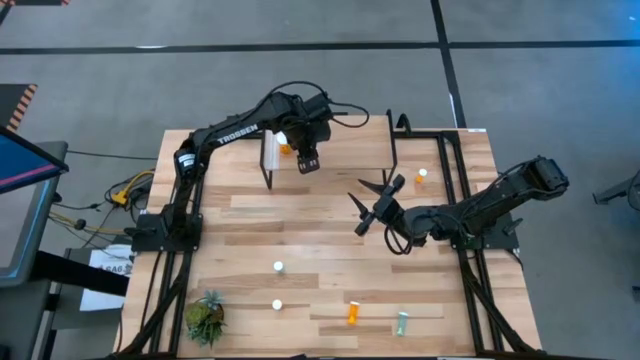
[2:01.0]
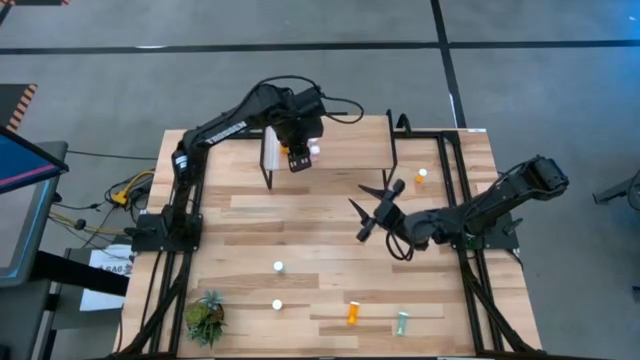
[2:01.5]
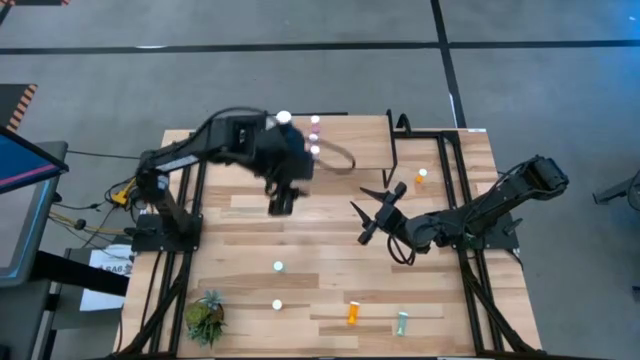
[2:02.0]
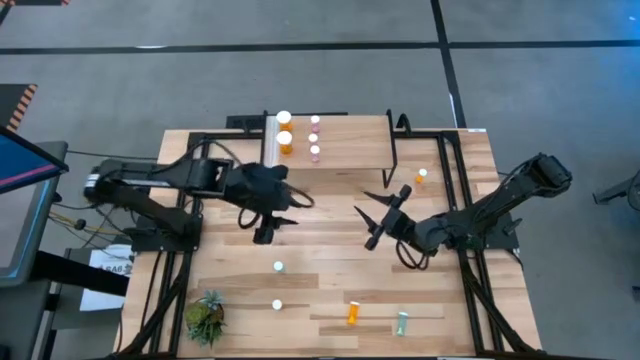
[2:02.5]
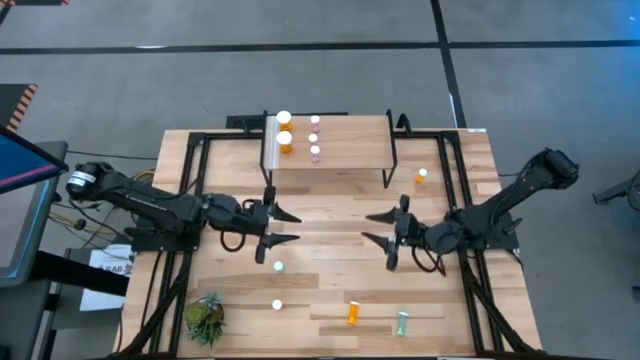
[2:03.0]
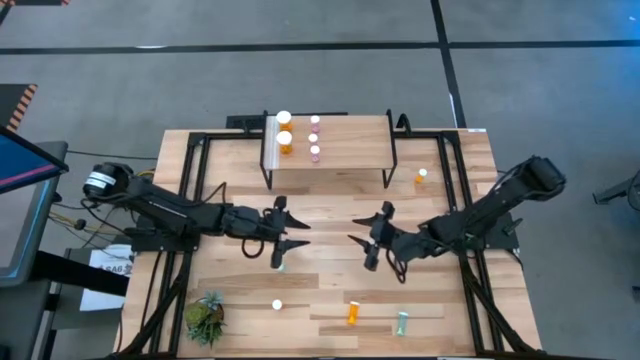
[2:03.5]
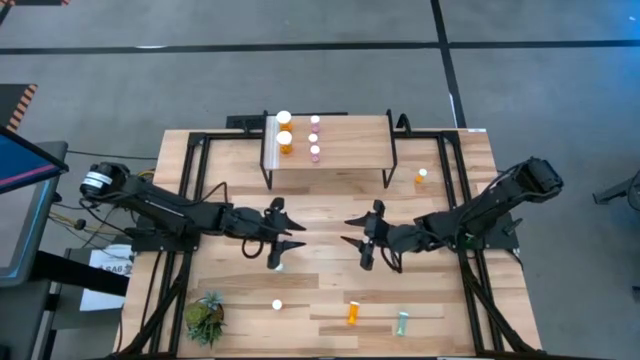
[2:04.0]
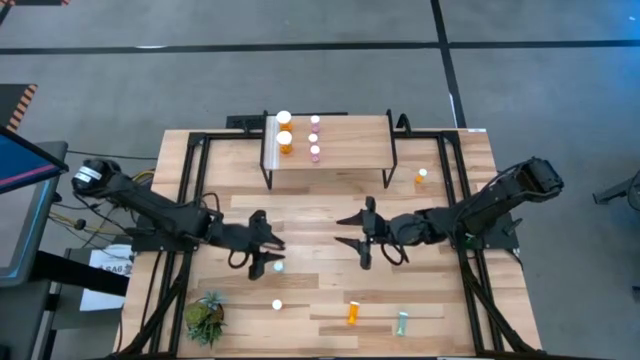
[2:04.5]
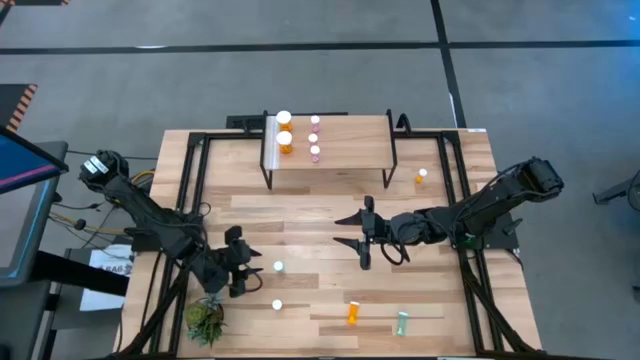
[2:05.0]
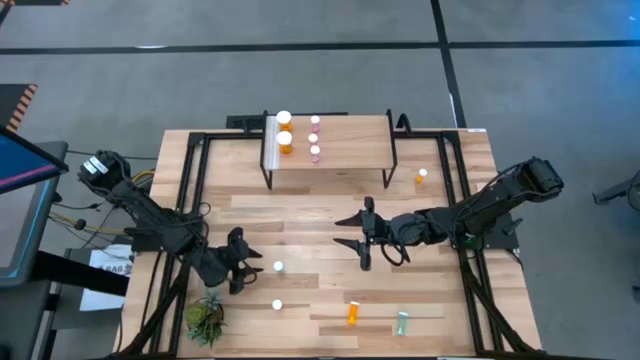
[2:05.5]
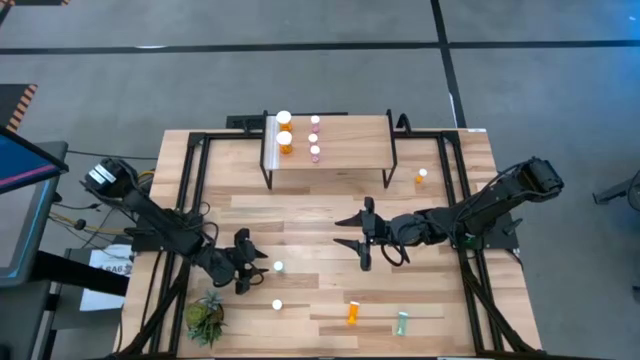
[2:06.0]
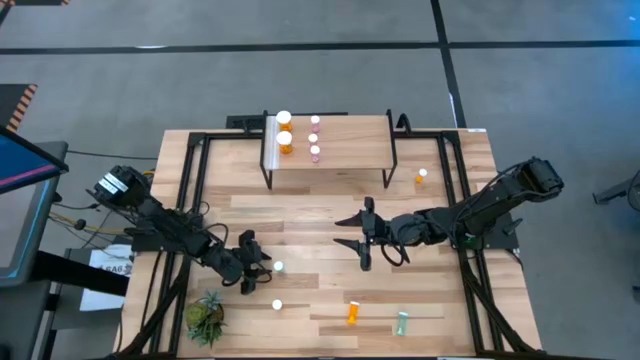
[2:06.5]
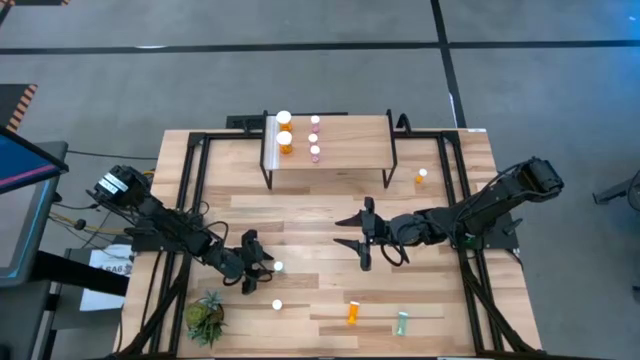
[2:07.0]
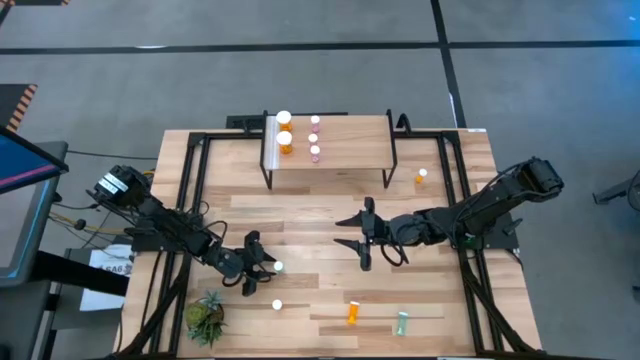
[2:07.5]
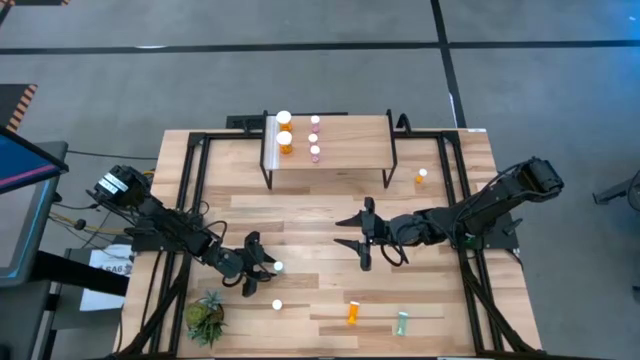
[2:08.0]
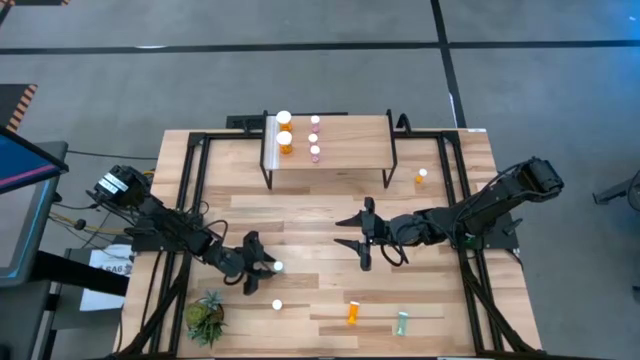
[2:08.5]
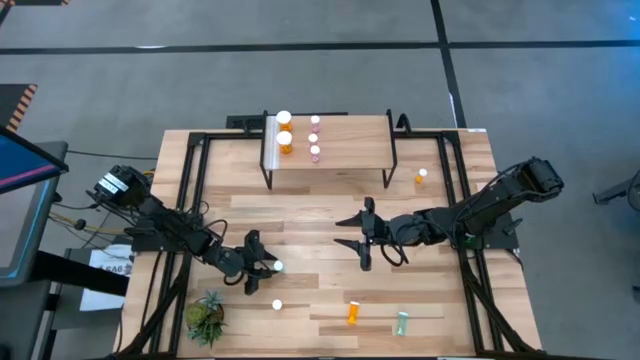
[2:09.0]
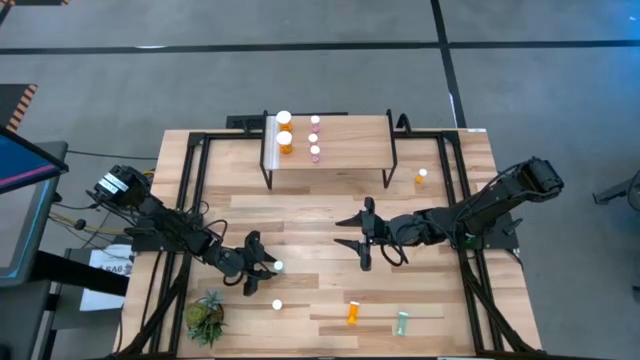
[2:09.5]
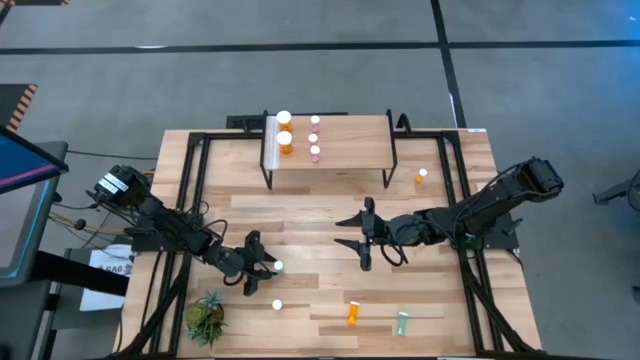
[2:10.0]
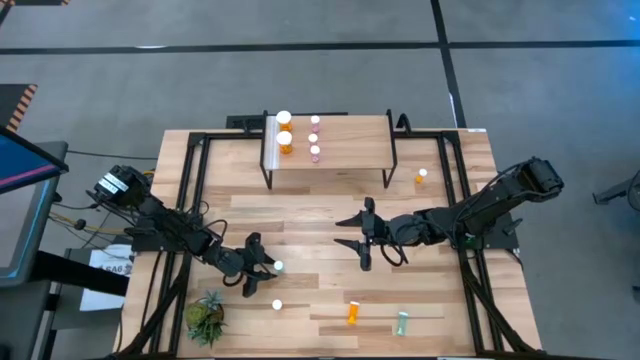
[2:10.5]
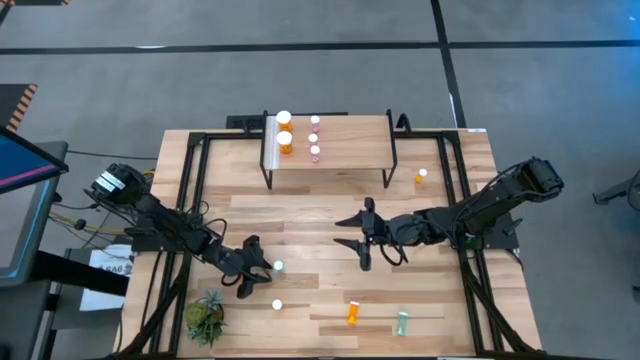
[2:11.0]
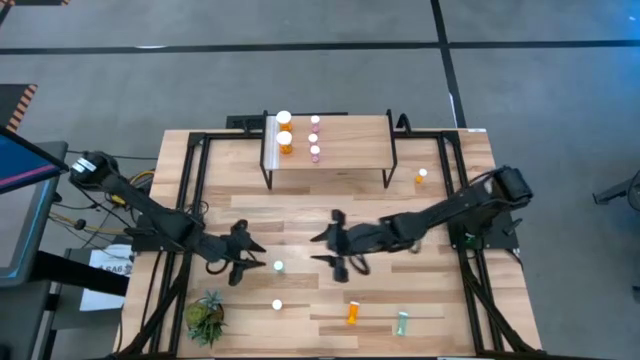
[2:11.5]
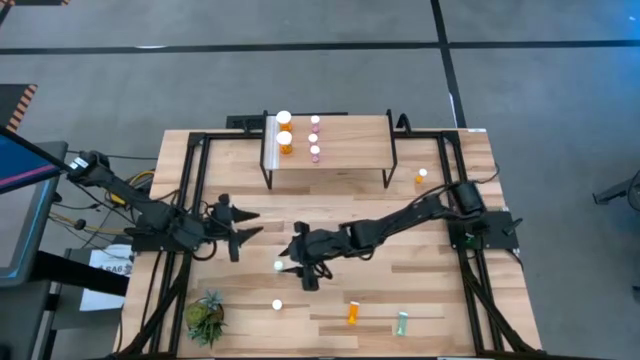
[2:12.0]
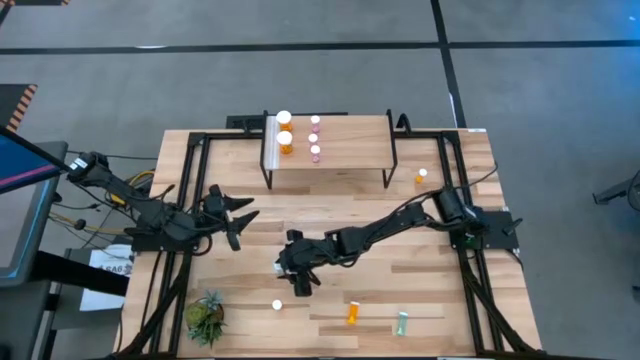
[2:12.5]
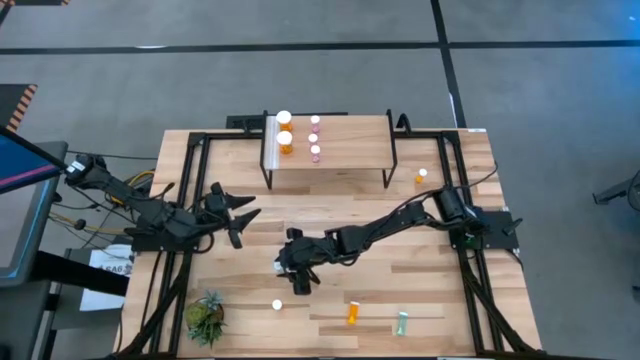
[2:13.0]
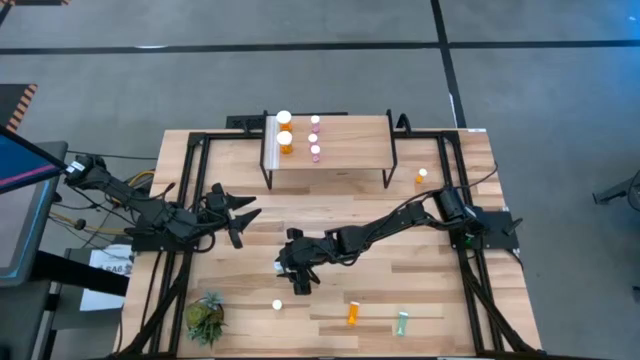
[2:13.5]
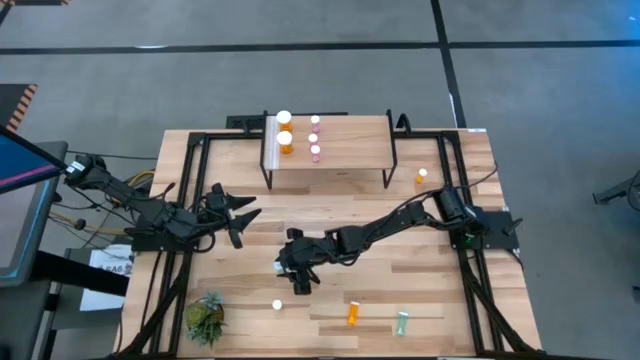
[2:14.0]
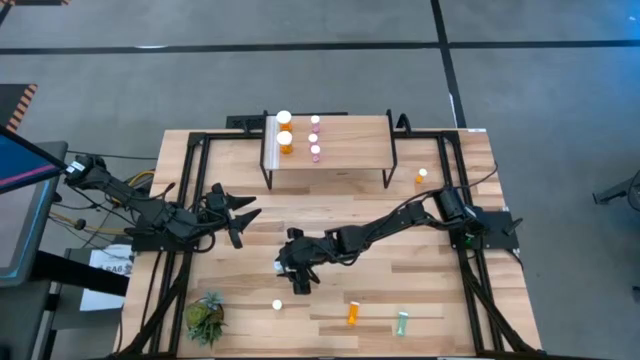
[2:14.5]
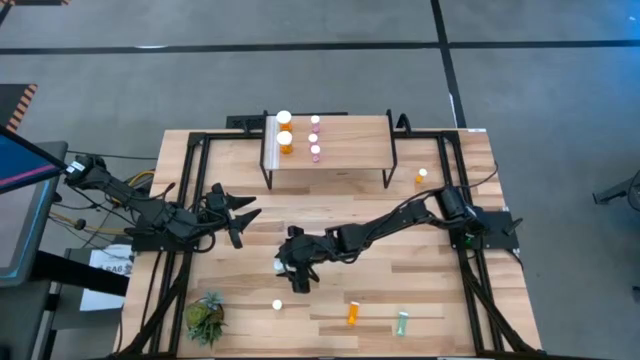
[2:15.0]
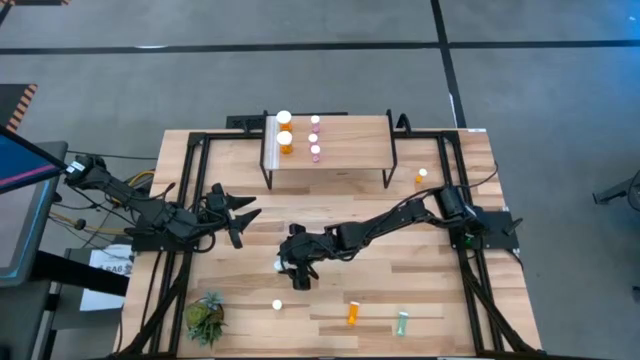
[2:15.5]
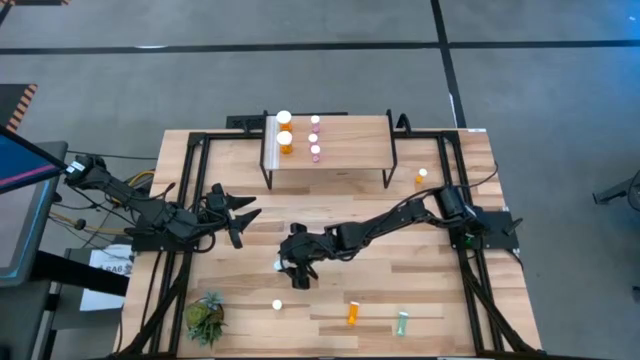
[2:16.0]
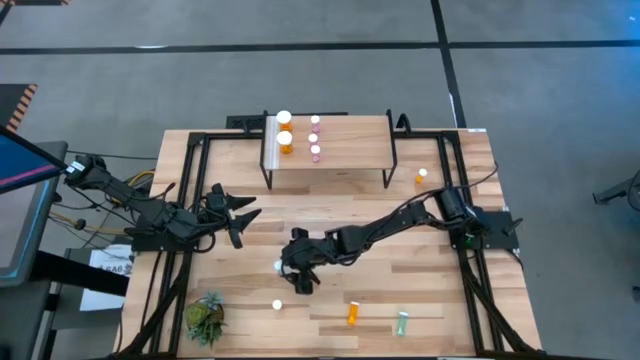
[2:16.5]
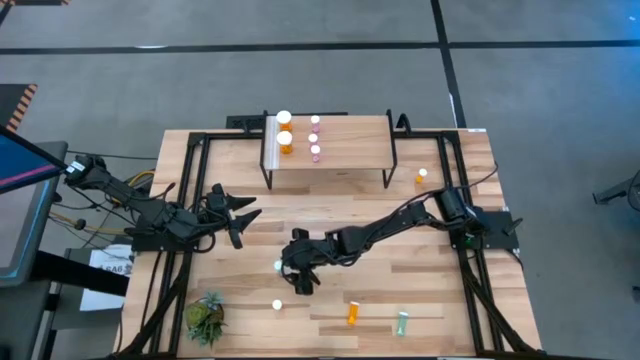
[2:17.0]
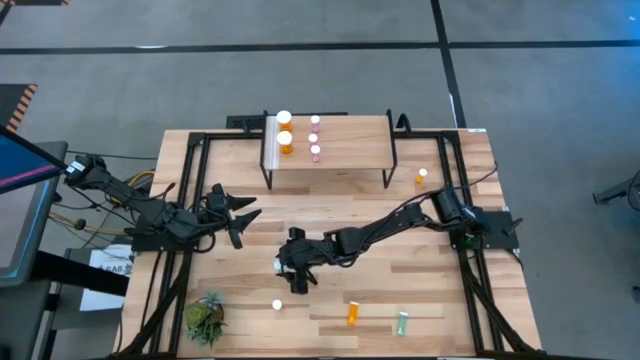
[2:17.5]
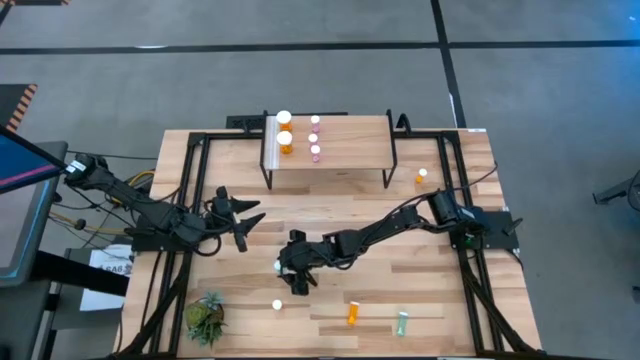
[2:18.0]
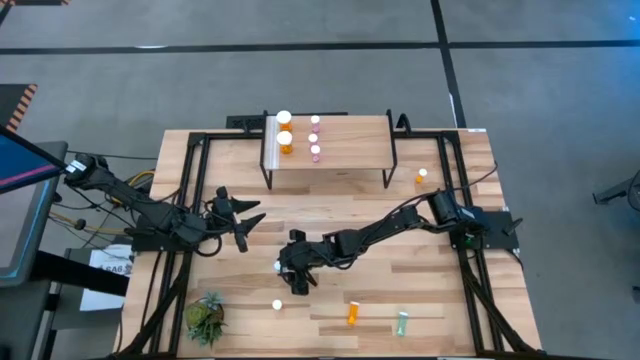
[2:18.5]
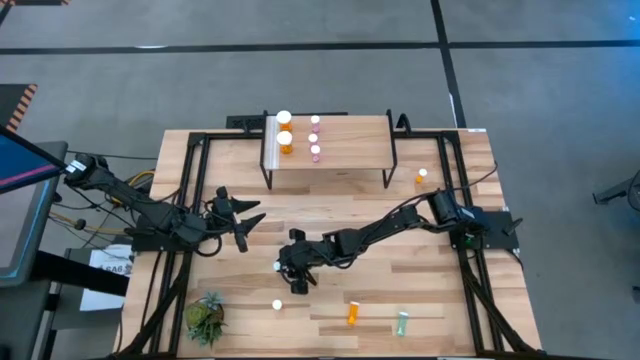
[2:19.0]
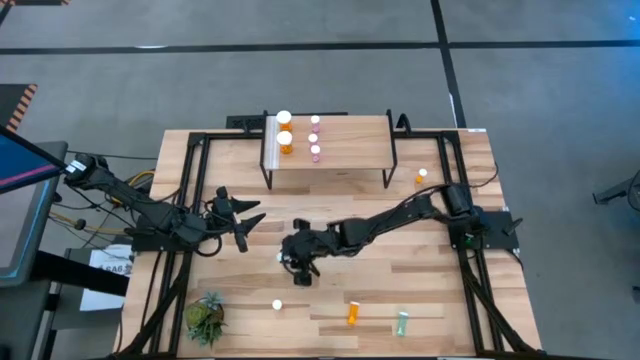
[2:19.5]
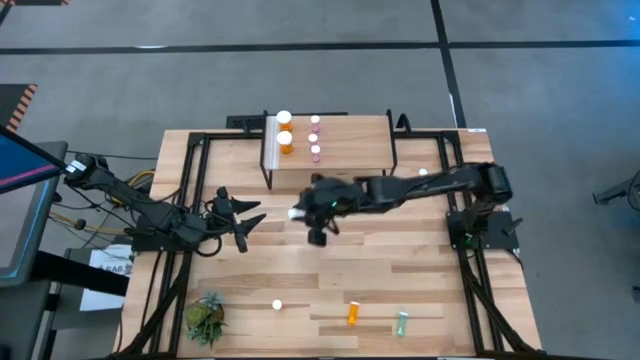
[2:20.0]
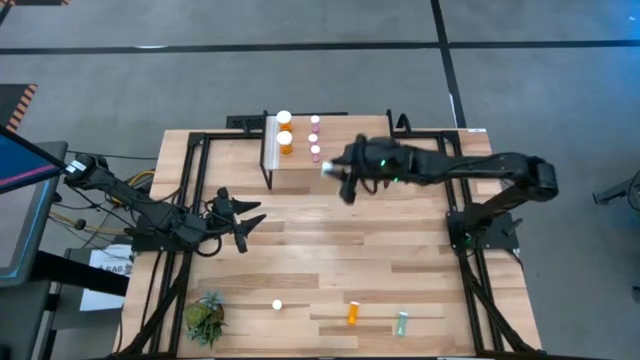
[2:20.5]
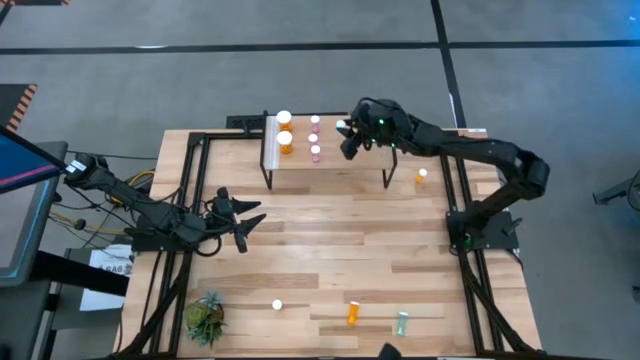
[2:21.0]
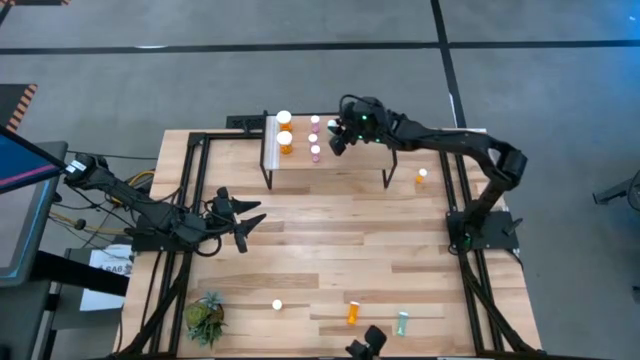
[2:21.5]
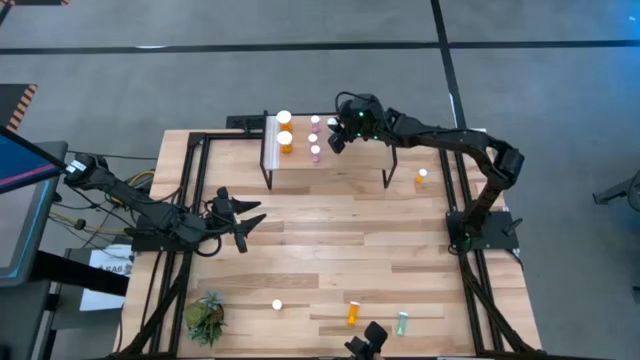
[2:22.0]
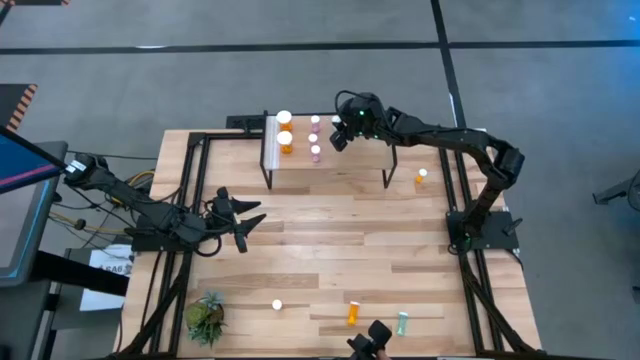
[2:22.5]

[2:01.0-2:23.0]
Task: Pick and place medicine bottles onto shelf by color
Put the top blue pill bottle on the shelf
